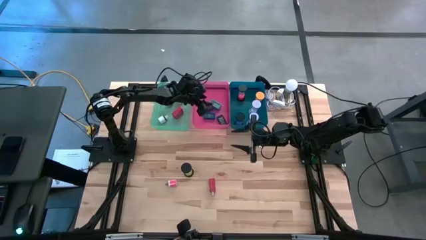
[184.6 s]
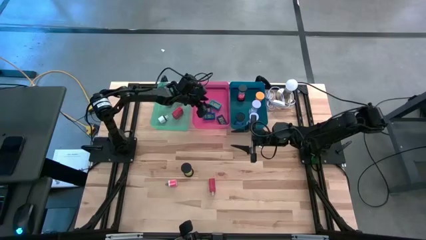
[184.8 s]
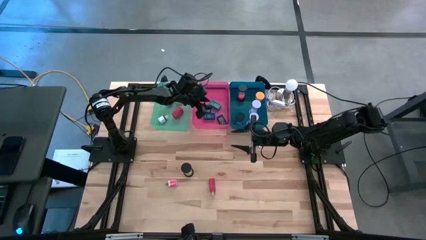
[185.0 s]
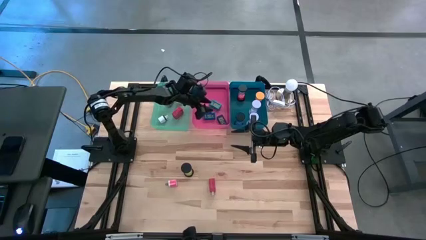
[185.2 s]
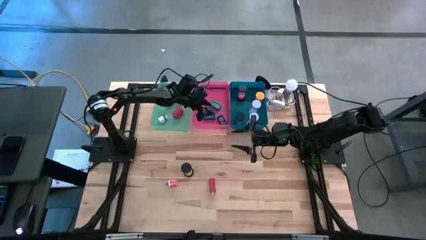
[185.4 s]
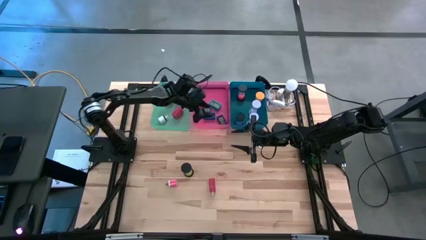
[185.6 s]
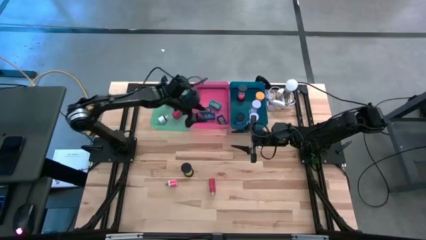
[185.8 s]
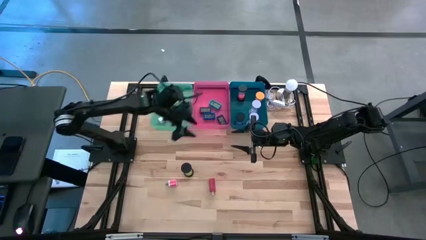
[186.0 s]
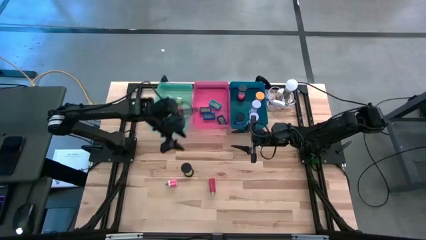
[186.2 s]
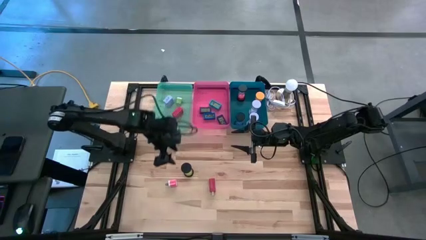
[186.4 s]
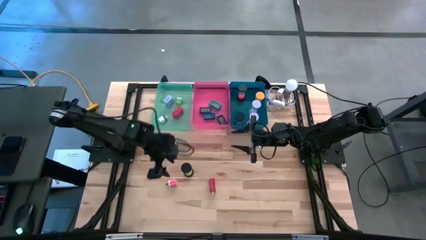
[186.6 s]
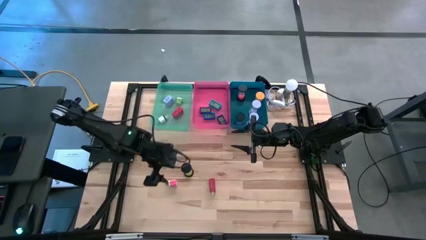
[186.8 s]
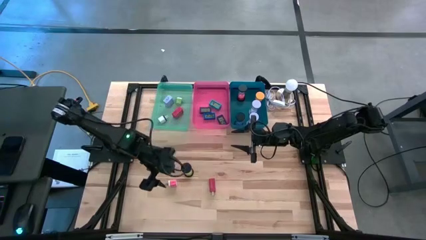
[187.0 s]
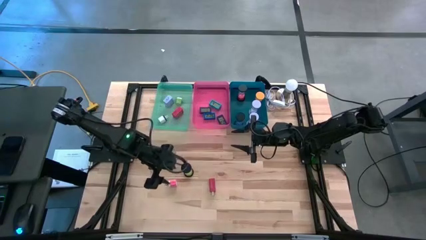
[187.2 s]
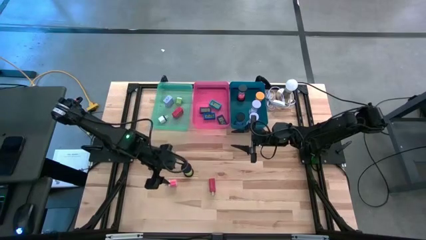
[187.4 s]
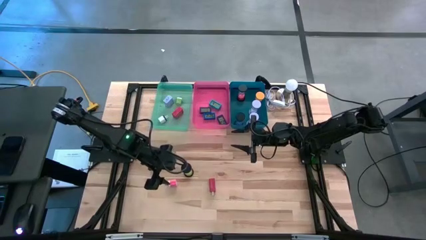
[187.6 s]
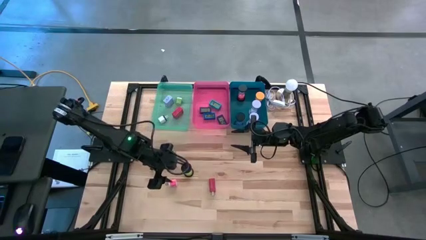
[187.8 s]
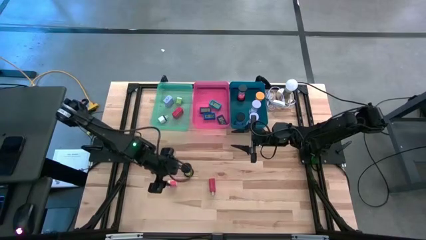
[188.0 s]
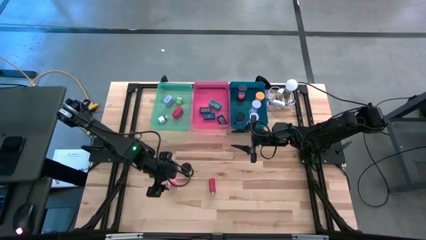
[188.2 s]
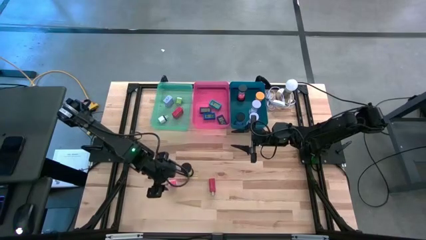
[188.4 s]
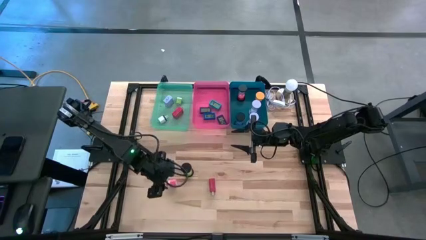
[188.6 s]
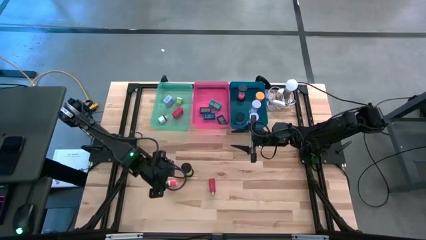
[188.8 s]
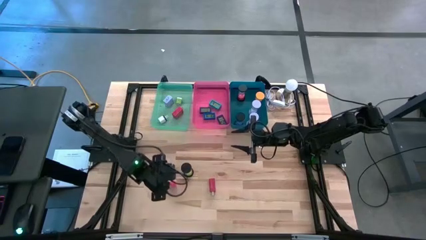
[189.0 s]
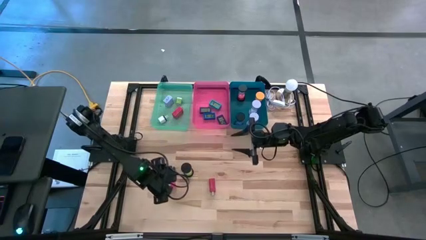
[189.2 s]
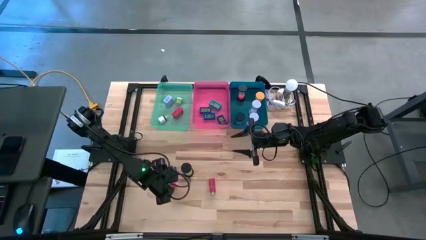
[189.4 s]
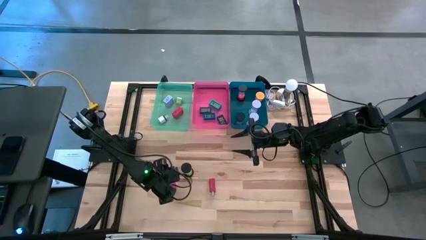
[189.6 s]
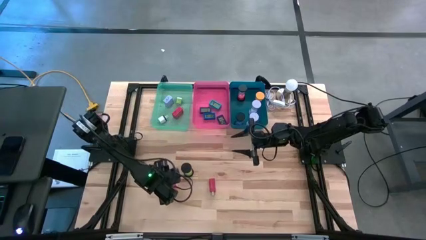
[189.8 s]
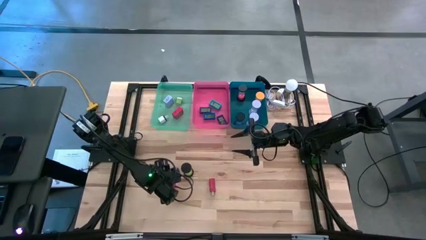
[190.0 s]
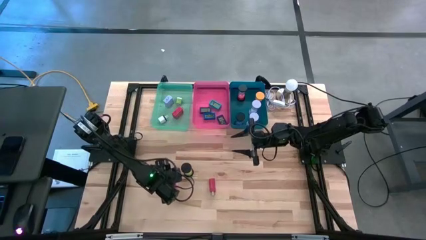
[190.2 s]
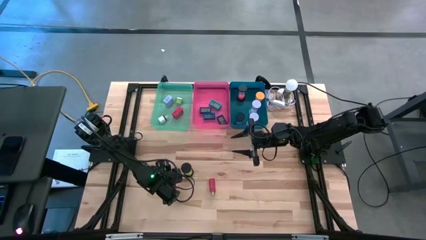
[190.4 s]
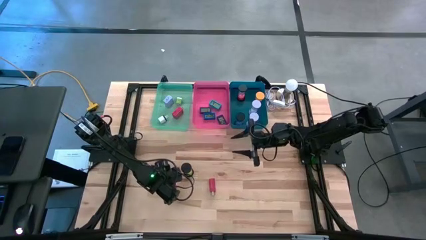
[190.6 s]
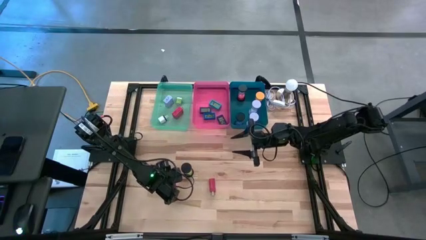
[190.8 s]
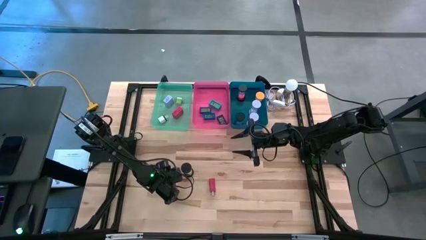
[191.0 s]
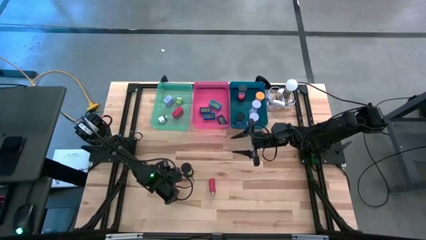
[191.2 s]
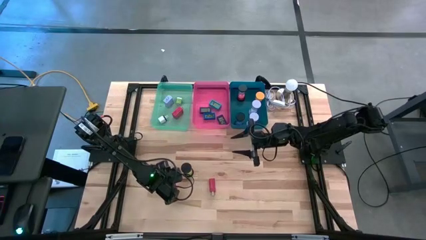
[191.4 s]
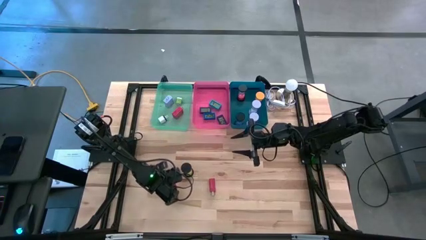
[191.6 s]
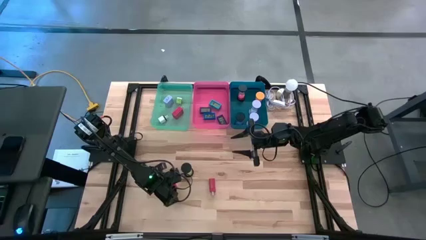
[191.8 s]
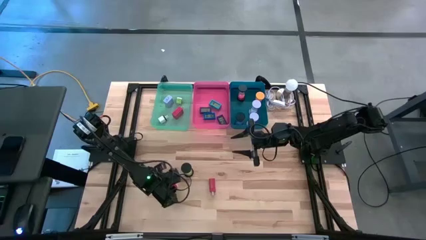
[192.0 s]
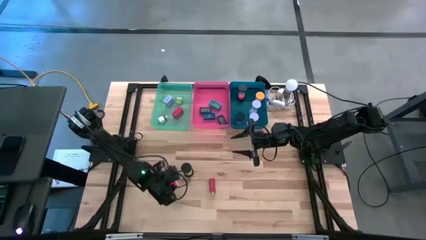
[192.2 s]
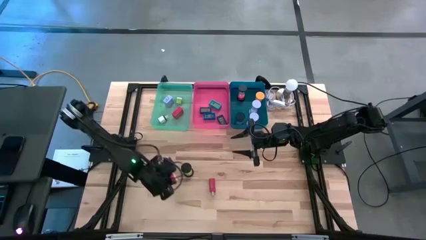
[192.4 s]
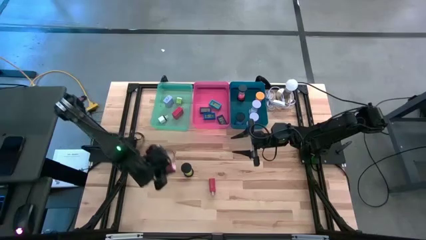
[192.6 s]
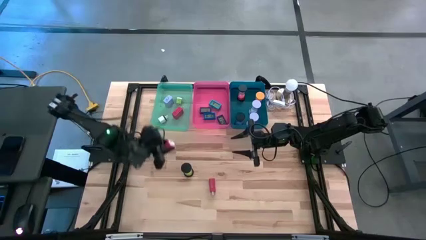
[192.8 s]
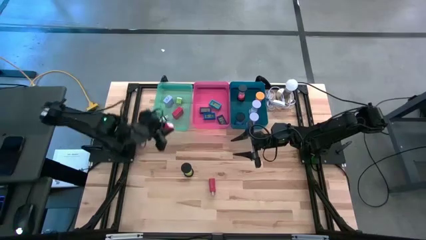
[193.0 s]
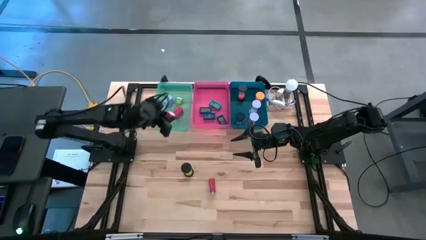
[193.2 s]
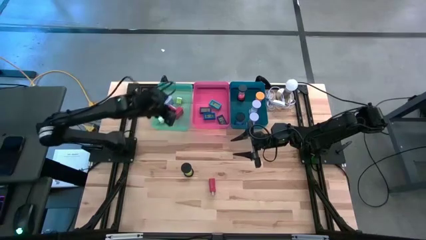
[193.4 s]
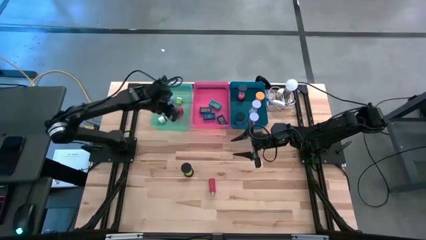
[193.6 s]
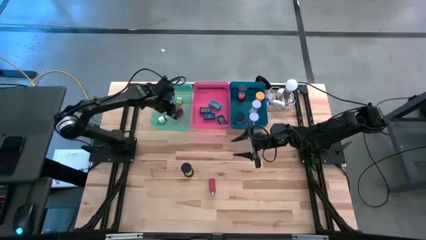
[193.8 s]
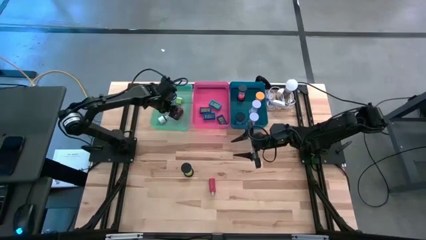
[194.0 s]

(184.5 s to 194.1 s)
Task: Pick & Place Office items
Put the pink white adapter into the green bin

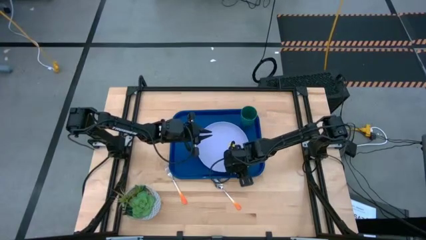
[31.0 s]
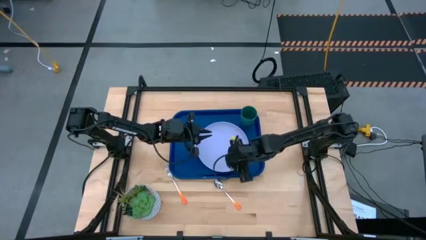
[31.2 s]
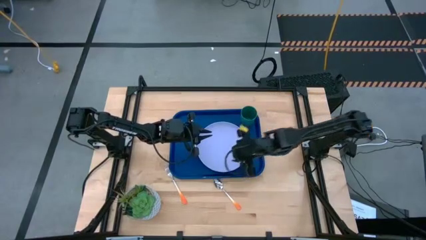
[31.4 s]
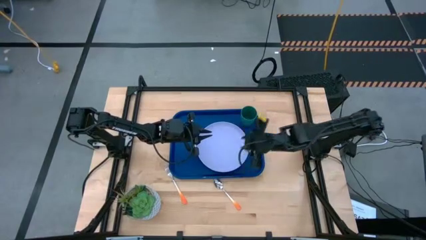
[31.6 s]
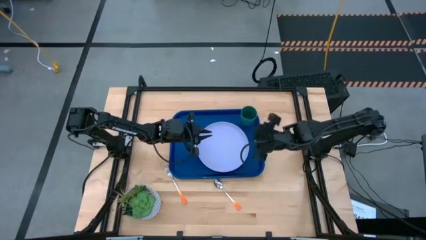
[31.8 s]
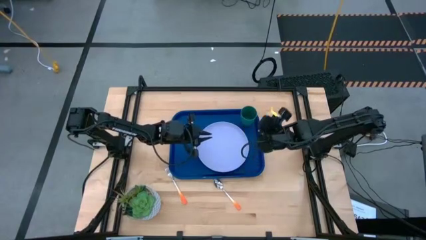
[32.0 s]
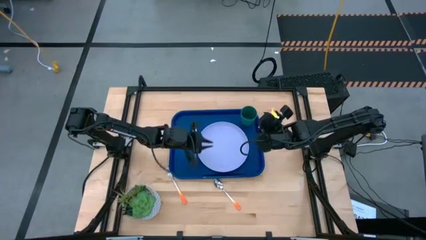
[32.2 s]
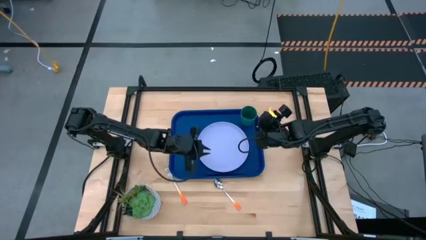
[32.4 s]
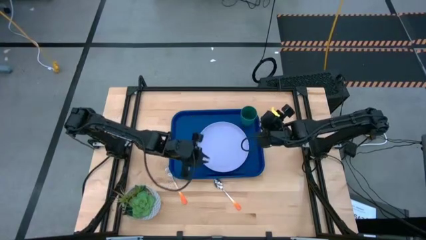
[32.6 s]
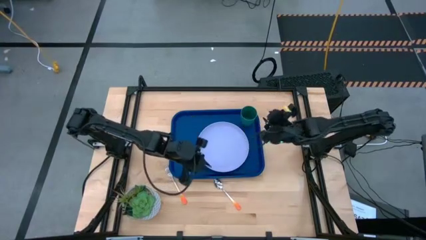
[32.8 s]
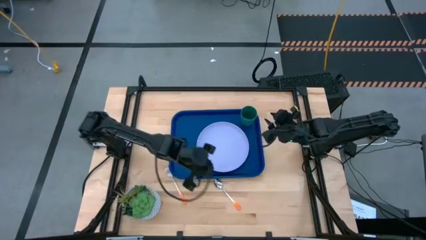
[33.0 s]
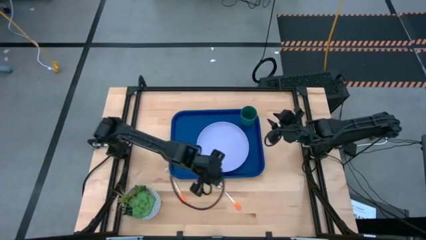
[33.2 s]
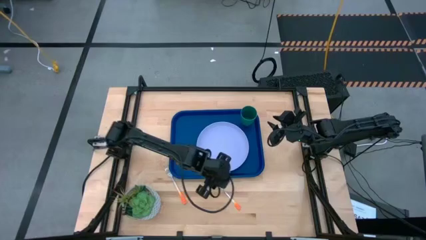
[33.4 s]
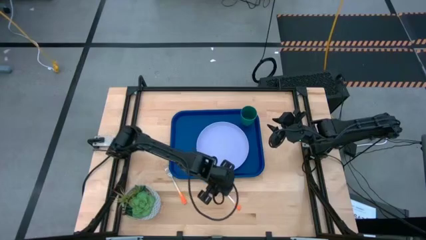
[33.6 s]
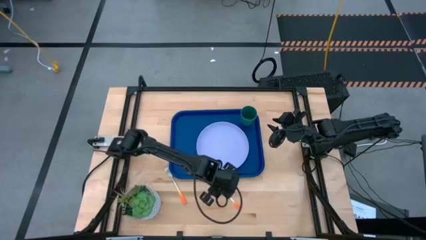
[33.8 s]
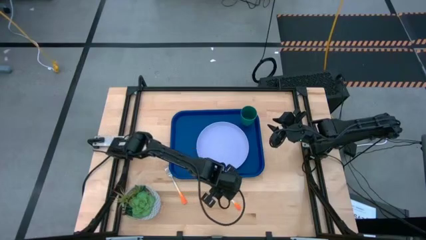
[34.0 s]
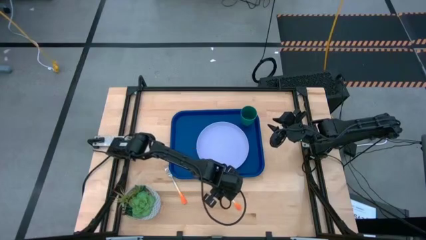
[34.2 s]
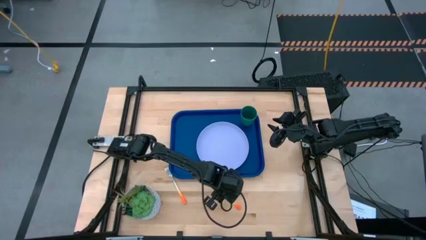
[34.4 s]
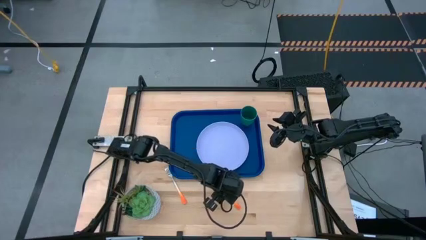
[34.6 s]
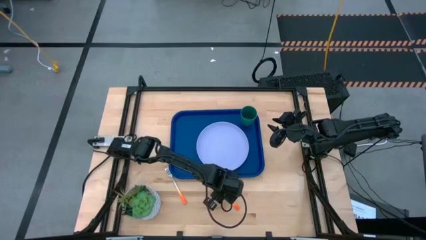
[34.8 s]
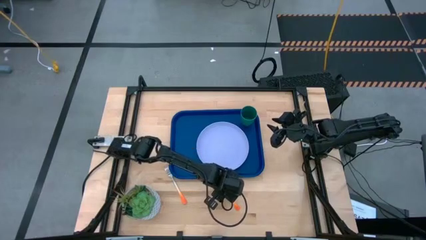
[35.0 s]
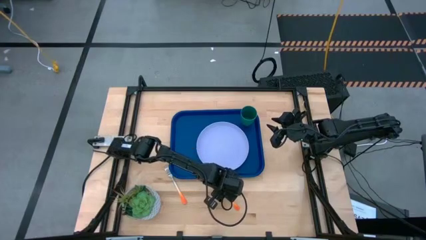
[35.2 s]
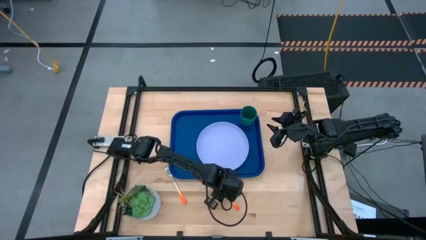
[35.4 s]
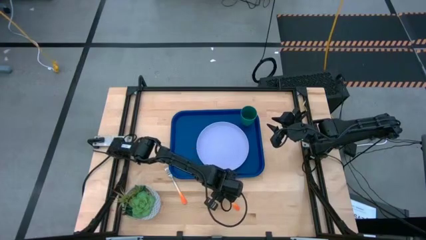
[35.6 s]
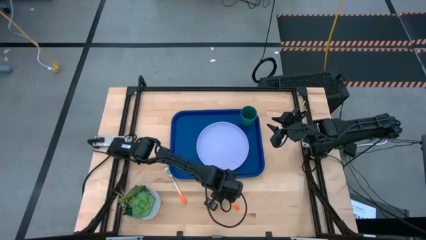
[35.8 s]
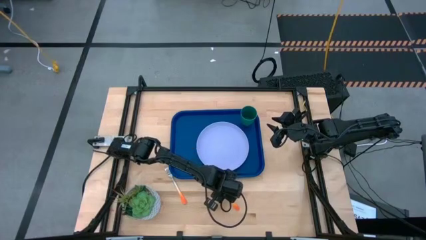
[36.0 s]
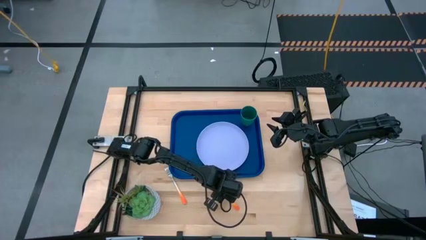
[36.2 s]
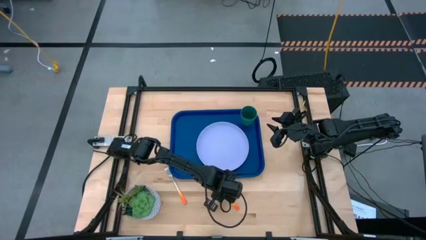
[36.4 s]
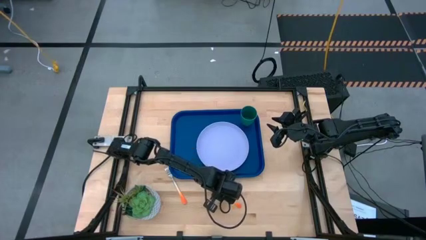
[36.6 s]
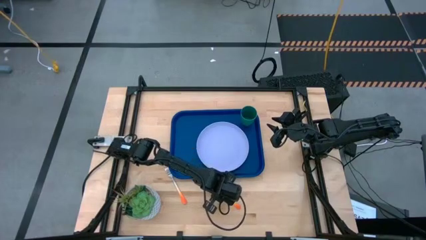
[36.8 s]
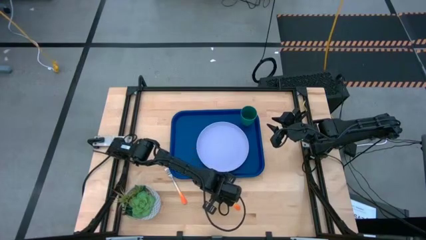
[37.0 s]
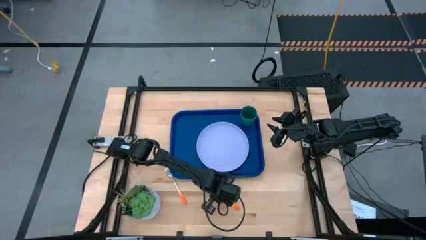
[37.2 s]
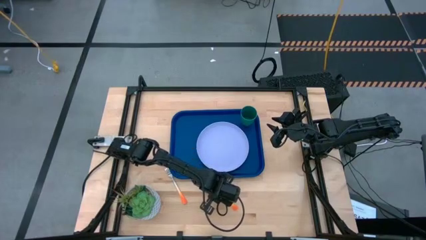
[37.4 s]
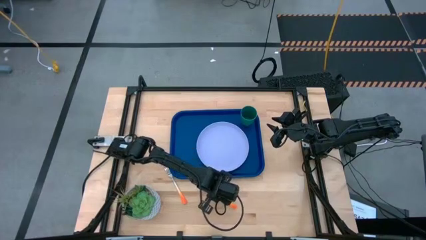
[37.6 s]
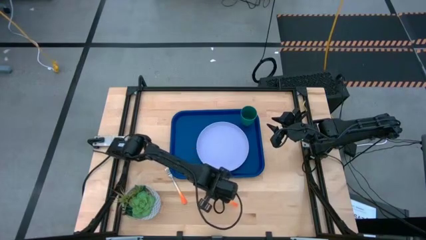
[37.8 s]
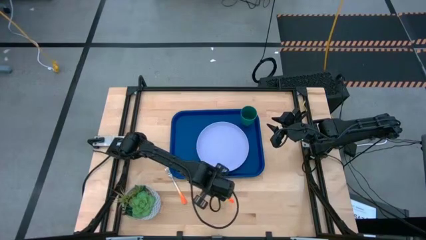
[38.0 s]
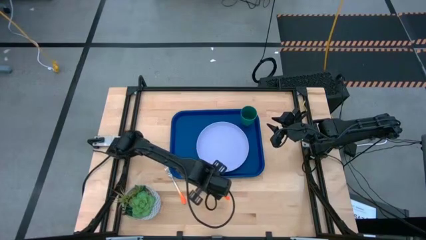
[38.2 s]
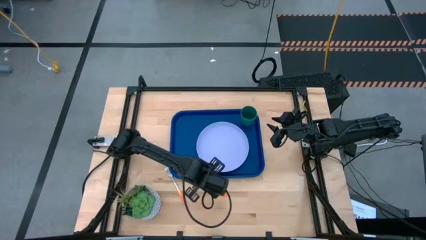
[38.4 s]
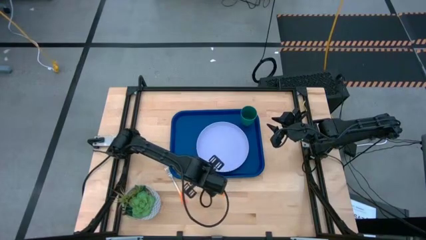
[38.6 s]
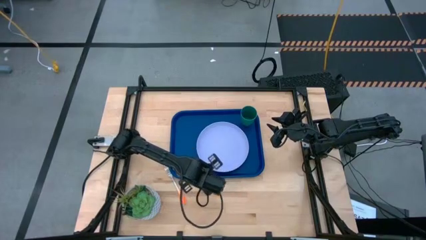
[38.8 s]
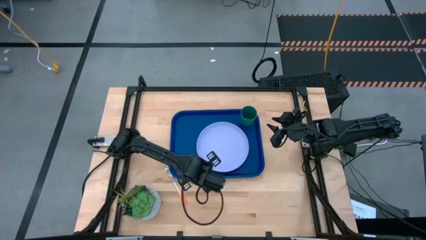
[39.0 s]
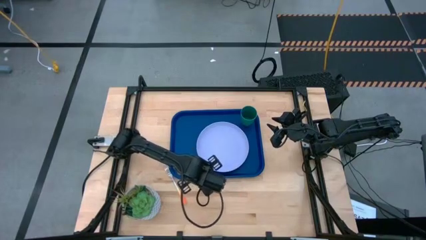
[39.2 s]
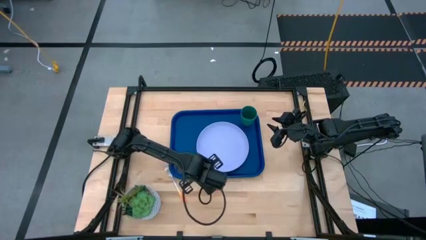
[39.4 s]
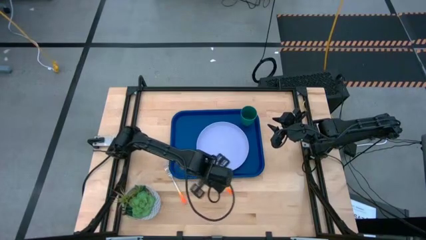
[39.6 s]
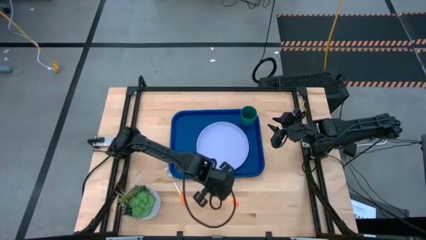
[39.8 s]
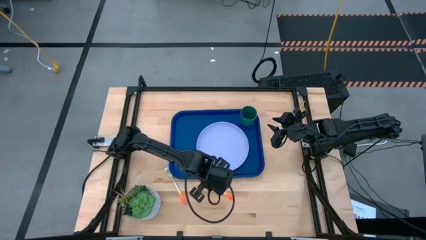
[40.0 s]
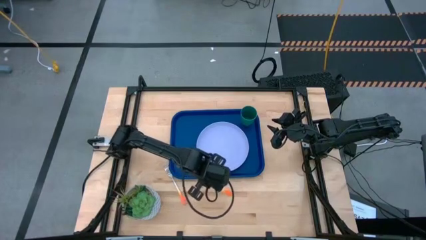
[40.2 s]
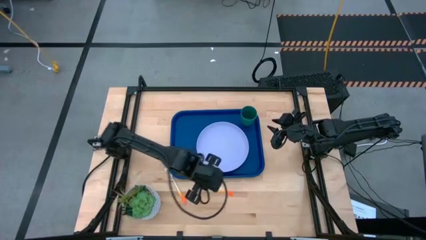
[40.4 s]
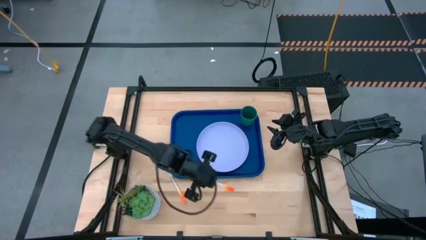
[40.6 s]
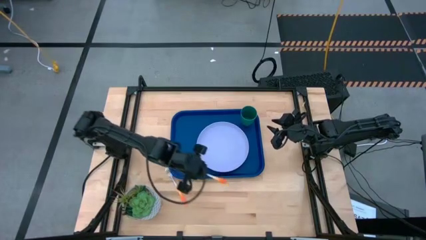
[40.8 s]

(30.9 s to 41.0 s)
Task: Pick and place plate/cup/fork/spoon on tray
Put the orange spoon to the left of the blue plate on the blue serving tray
